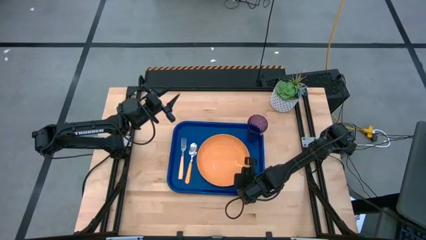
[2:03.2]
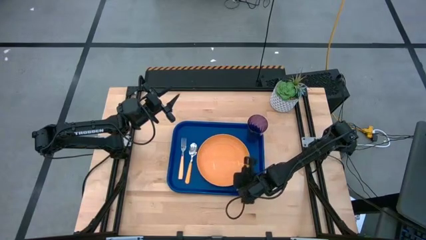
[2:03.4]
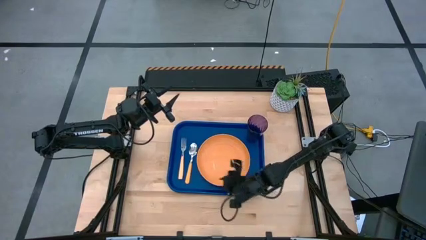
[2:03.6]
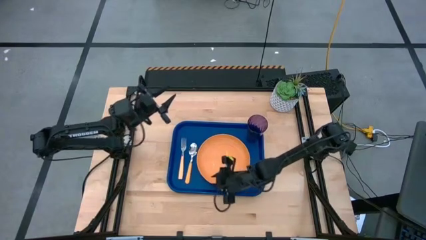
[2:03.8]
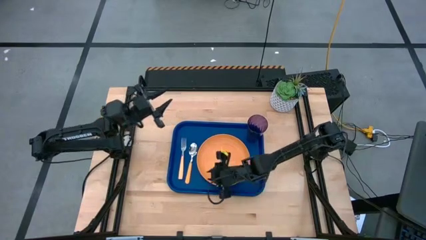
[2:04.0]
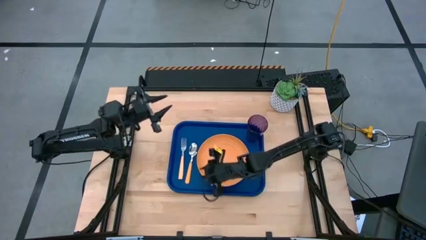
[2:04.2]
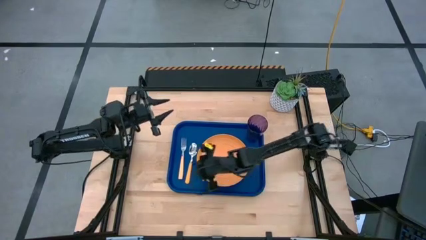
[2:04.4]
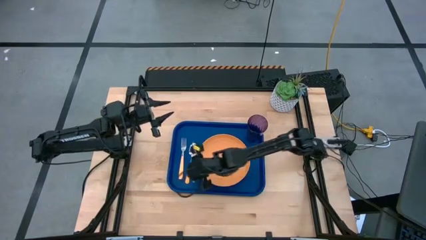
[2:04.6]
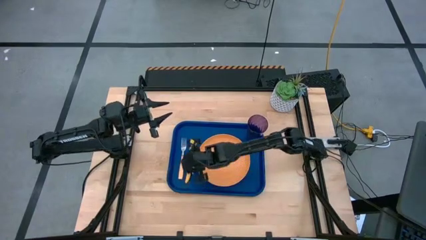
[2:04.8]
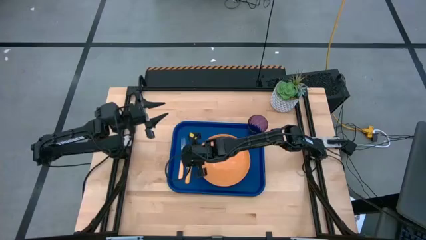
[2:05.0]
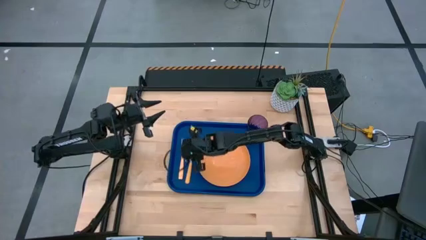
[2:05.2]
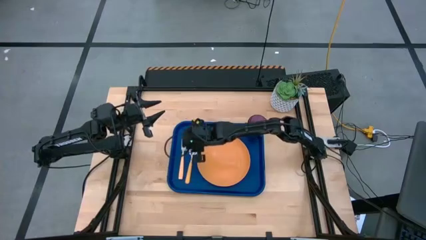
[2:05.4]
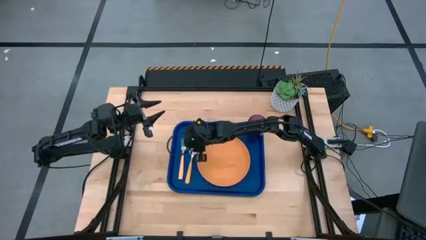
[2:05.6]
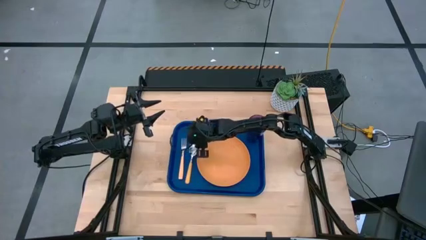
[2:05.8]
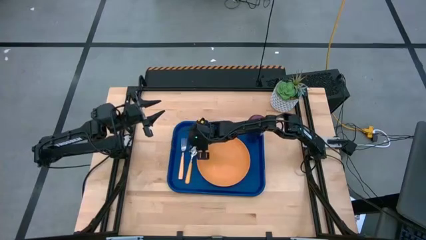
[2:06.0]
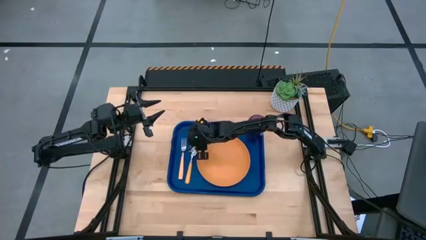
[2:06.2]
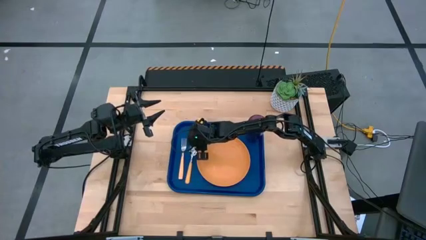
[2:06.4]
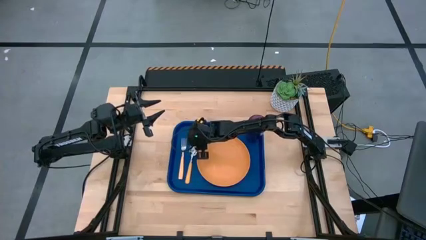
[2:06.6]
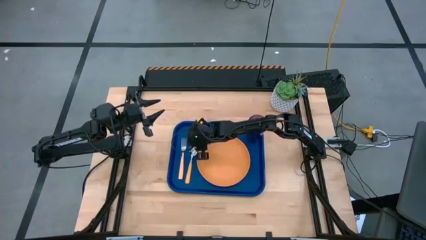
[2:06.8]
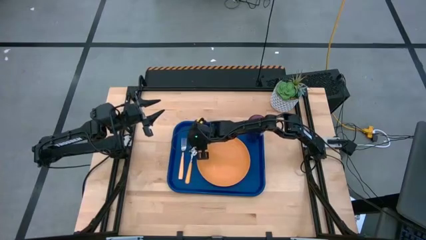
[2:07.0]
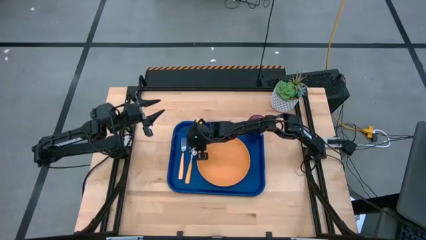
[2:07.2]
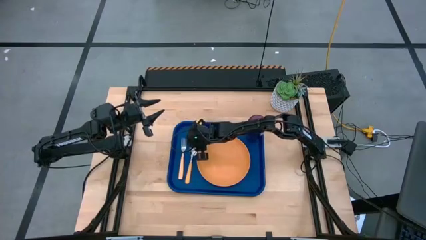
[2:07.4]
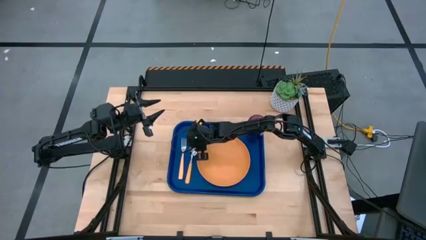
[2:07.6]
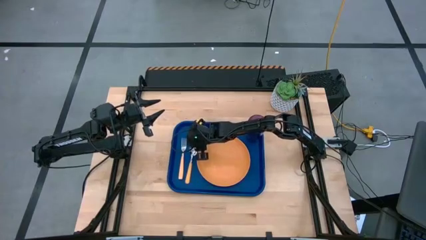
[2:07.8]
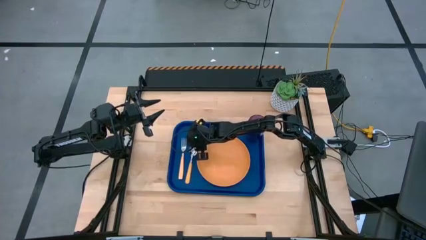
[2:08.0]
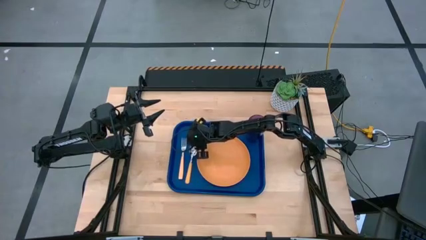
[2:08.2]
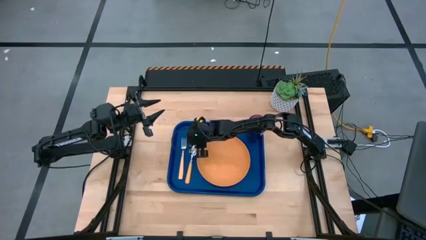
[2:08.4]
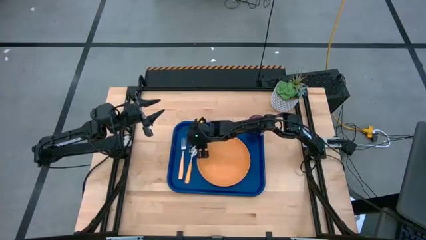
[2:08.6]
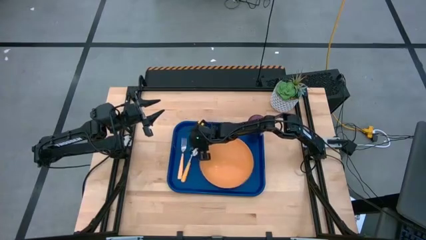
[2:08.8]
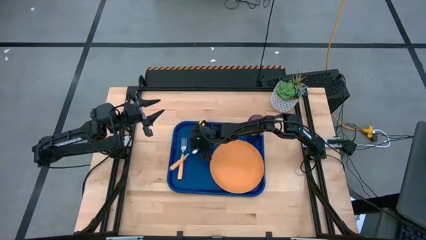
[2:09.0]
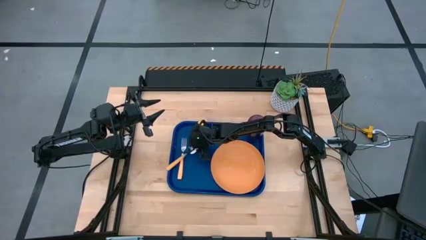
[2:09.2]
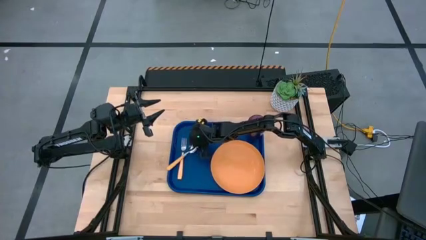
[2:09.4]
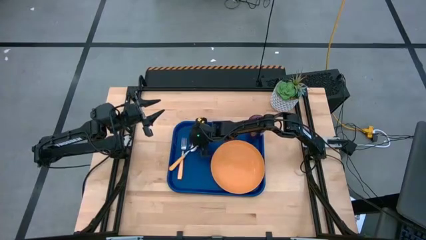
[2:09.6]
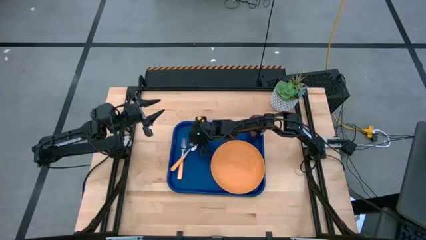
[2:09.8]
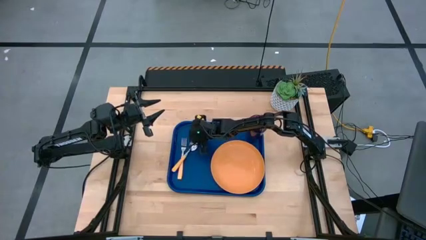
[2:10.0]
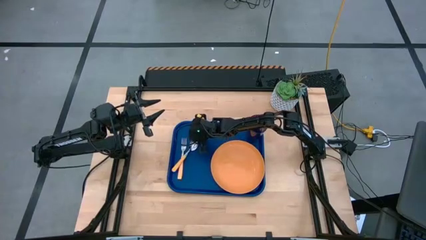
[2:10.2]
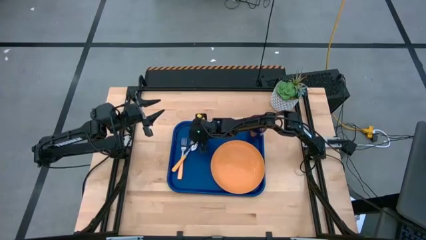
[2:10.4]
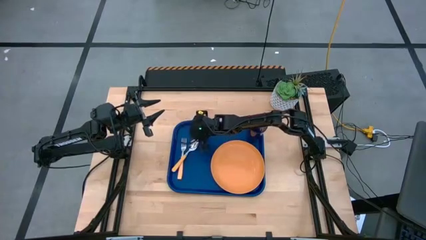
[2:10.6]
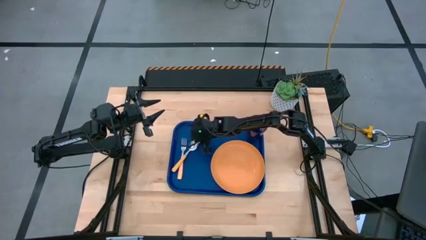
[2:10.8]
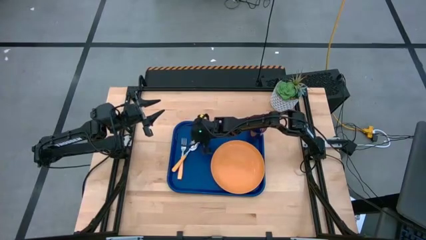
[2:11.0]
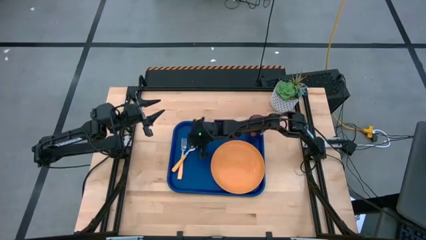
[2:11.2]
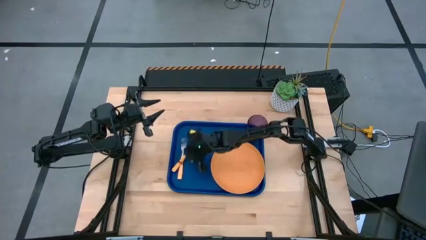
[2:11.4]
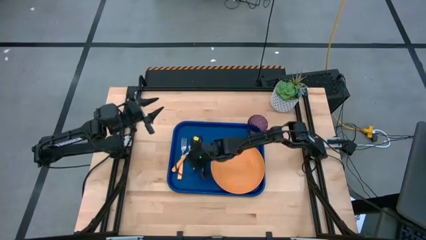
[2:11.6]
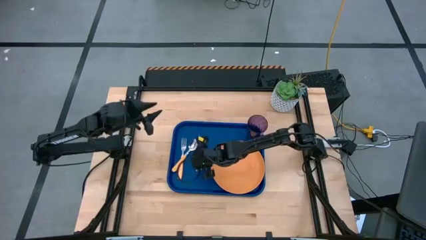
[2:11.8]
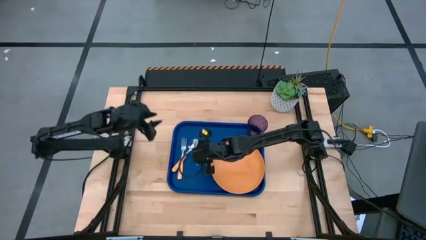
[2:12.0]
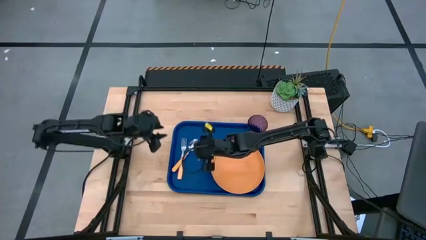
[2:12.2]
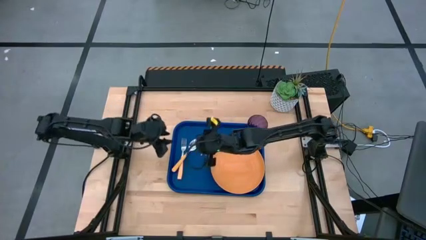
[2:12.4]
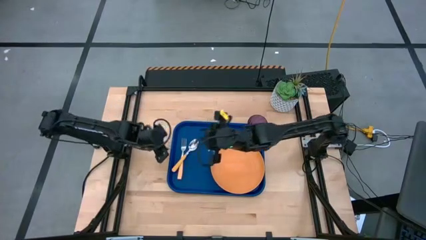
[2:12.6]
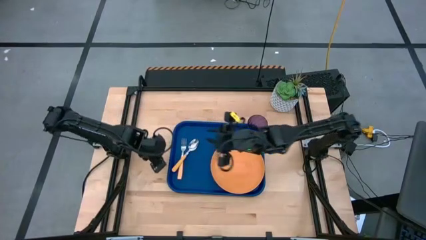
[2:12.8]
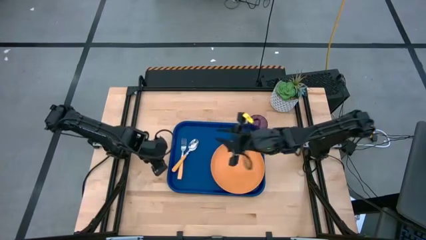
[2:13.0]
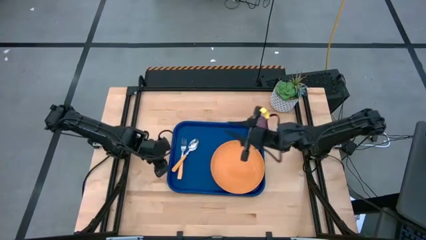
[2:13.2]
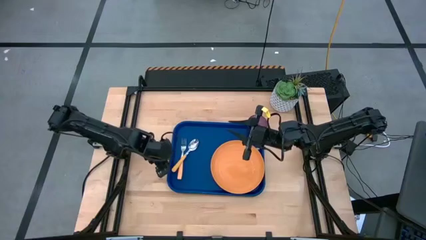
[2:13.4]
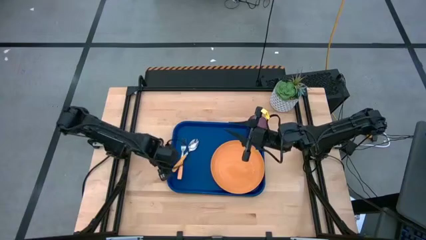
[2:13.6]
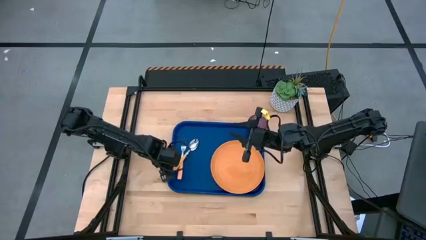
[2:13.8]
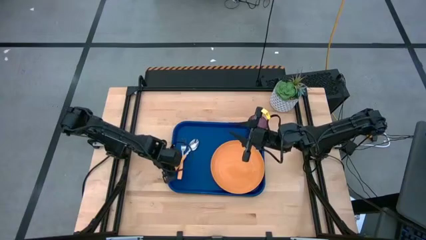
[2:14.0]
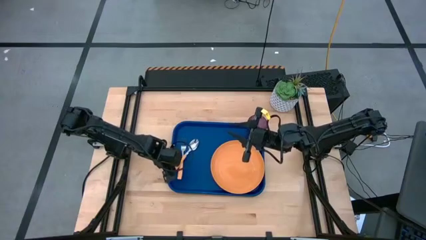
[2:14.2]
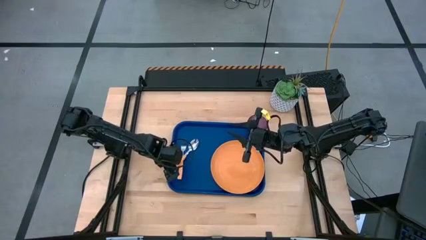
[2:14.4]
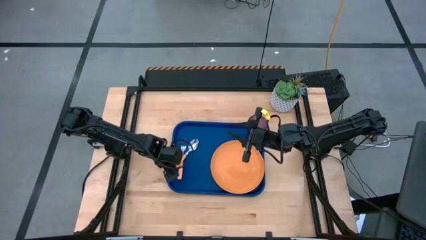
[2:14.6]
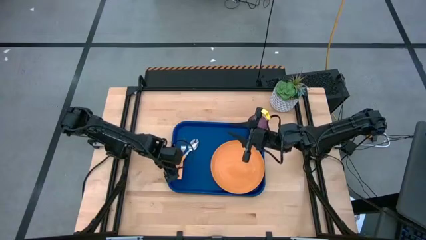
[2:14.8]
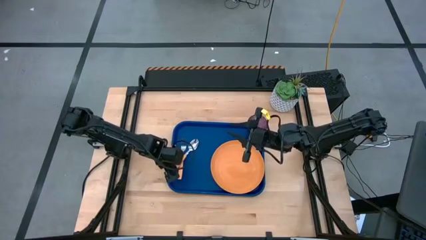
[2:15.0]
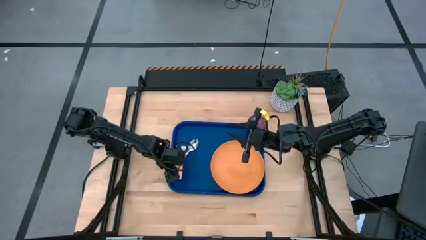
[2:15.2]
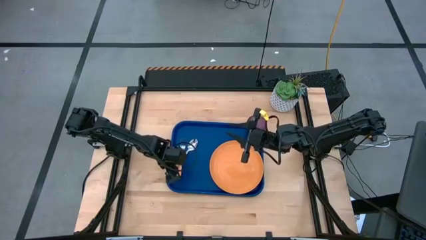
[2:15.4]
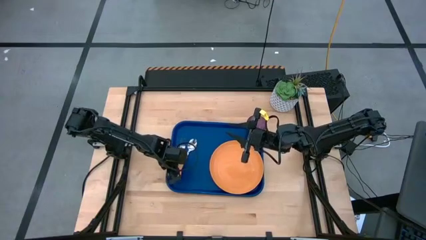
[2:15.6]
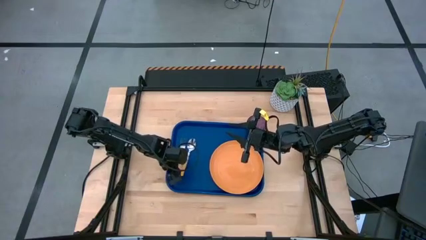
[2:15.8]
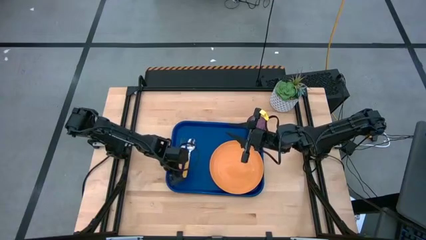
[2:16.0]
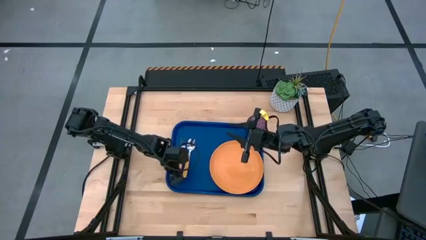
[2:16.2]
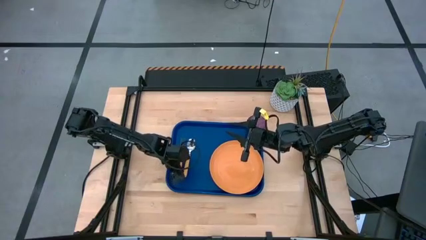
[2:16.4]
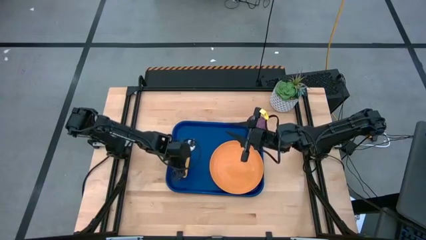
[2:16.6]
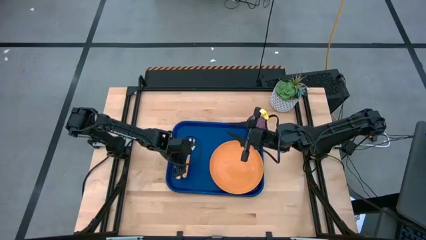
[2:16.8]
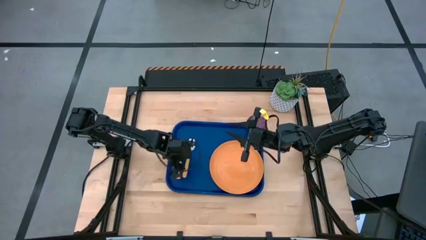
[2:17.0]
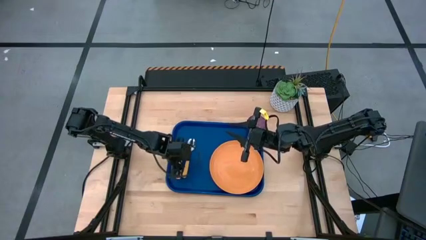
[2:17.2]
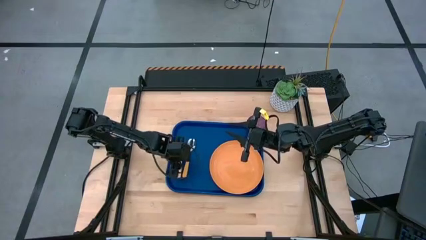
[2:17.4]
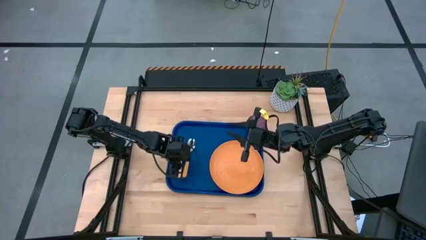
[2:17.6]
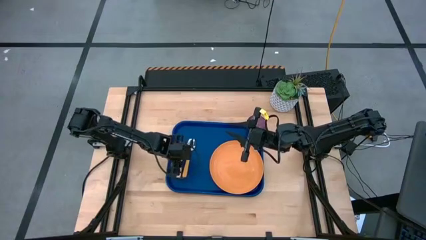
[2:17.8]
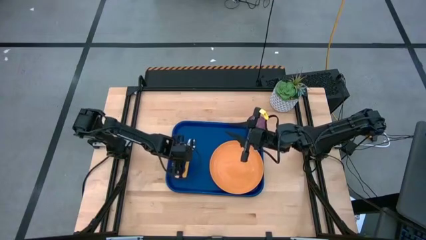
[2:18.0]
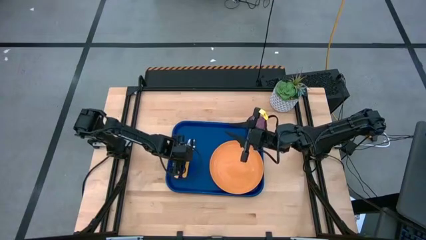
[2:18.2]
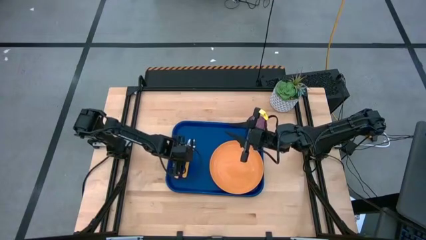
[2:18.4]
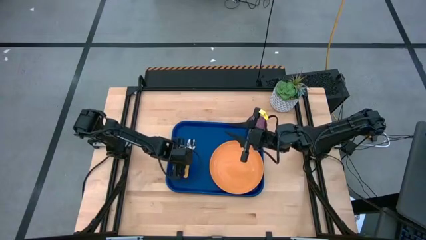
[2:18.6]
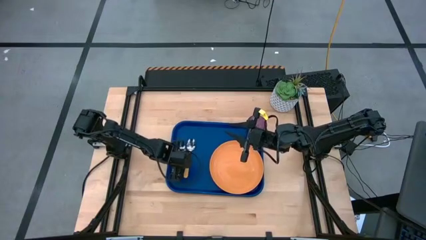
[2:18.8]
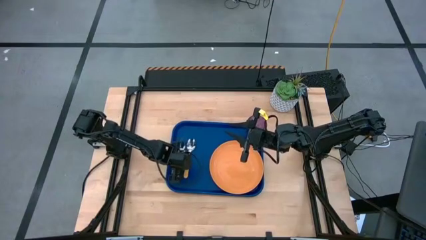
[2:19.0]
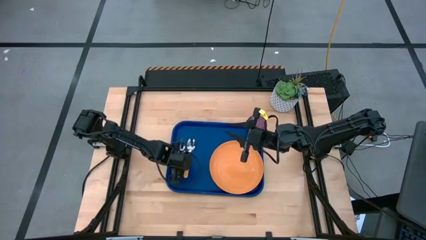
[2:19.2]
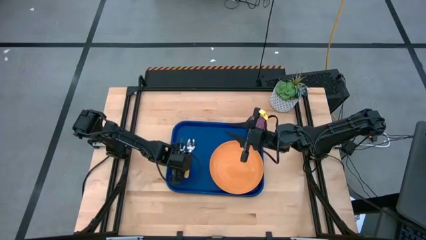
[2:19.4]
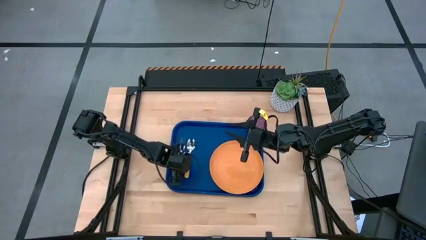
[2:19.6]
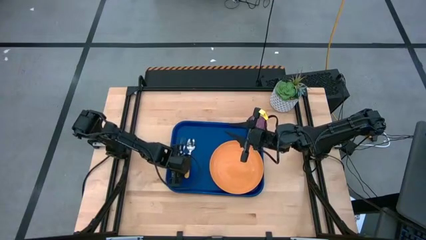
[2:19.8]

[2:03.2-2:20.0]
Task: Pick and place plate/cup/fork/spoon on tray
Adjust the yellow spoon on the blue serving tray
